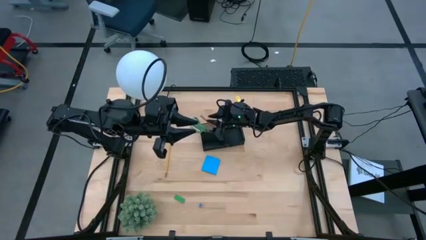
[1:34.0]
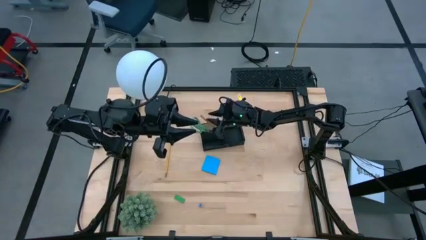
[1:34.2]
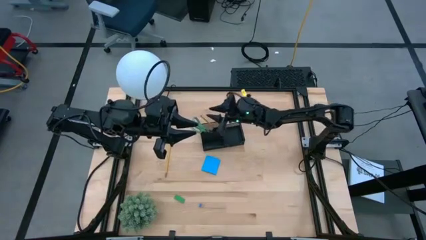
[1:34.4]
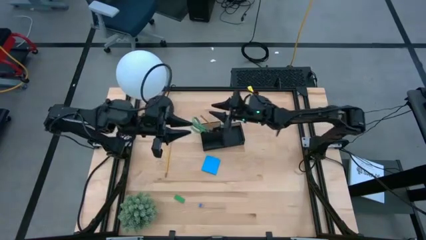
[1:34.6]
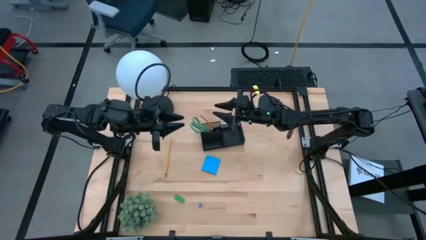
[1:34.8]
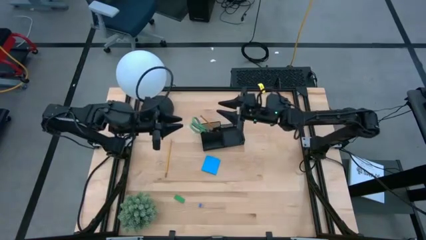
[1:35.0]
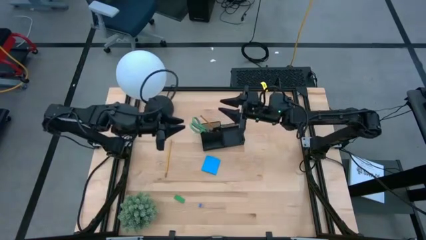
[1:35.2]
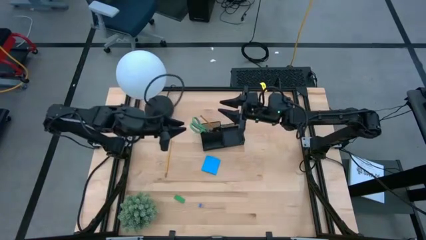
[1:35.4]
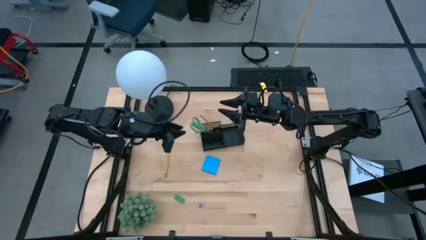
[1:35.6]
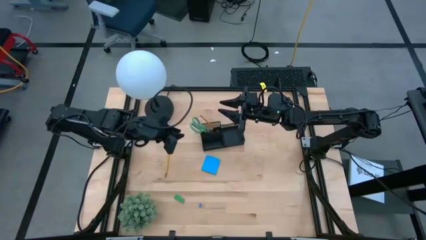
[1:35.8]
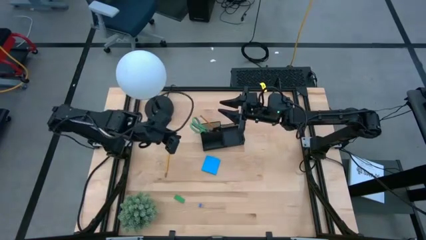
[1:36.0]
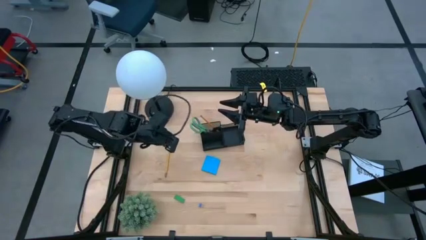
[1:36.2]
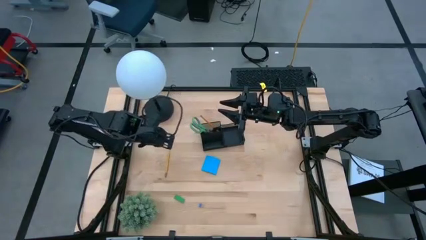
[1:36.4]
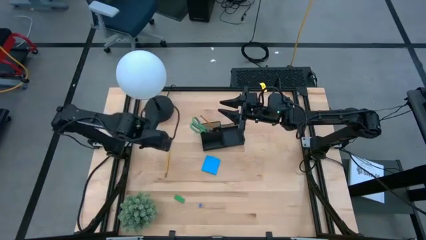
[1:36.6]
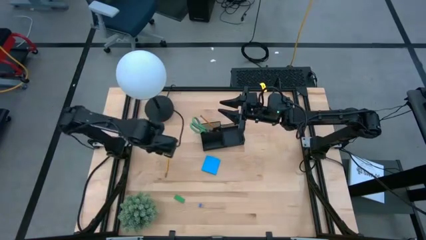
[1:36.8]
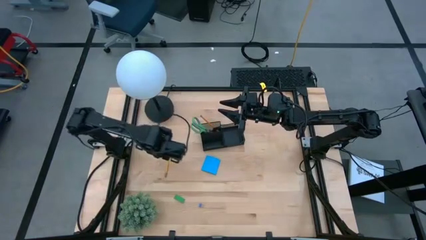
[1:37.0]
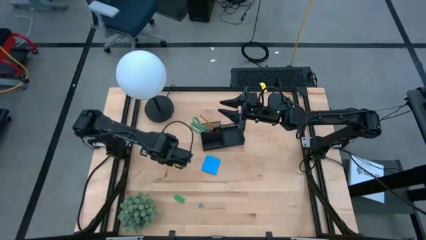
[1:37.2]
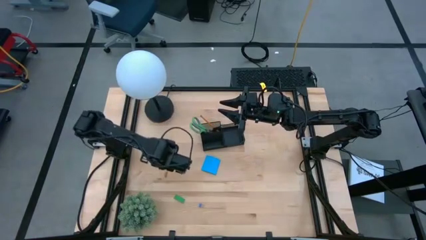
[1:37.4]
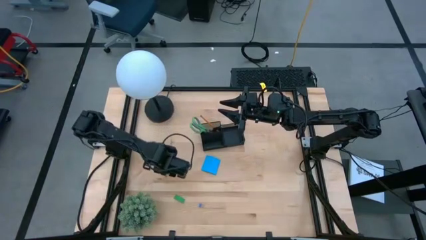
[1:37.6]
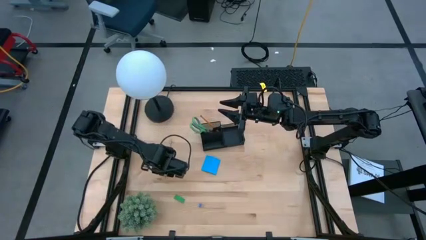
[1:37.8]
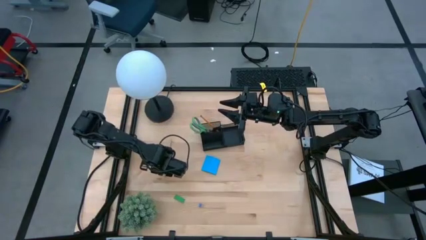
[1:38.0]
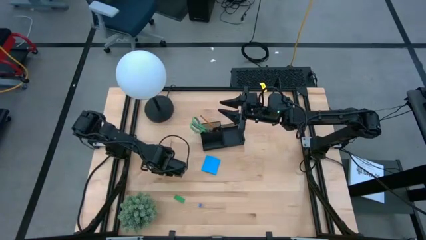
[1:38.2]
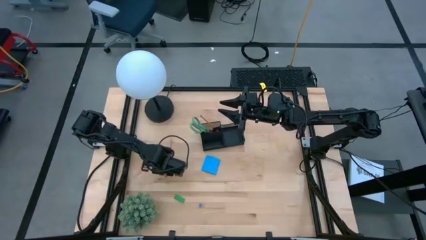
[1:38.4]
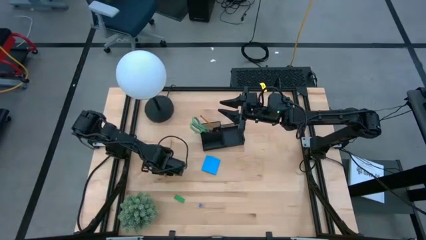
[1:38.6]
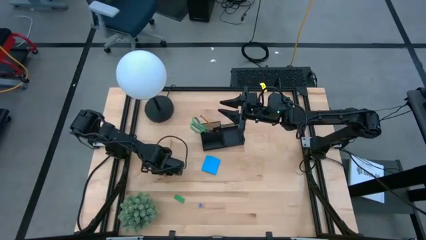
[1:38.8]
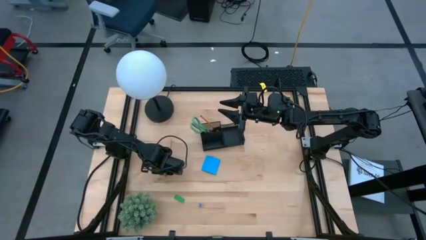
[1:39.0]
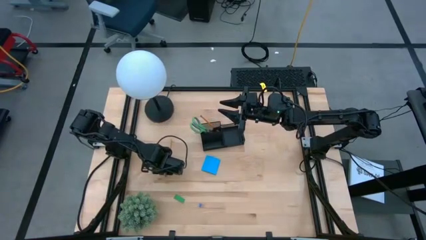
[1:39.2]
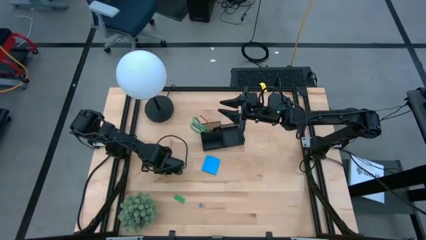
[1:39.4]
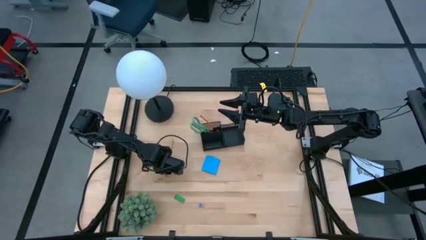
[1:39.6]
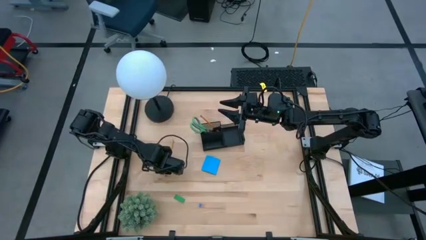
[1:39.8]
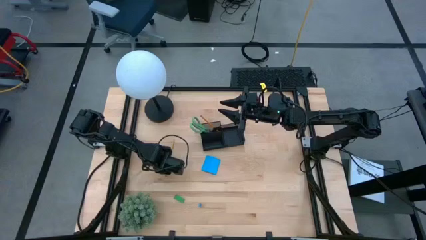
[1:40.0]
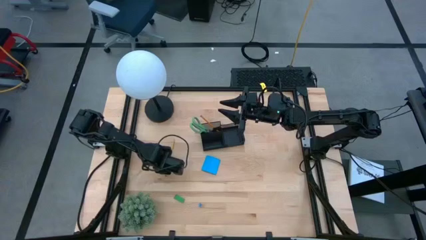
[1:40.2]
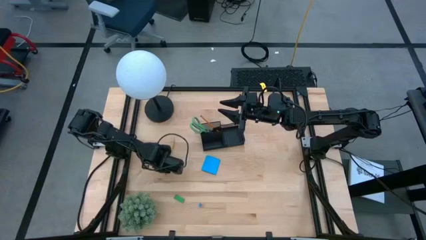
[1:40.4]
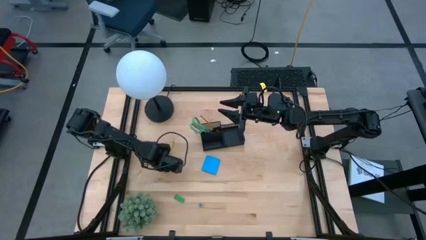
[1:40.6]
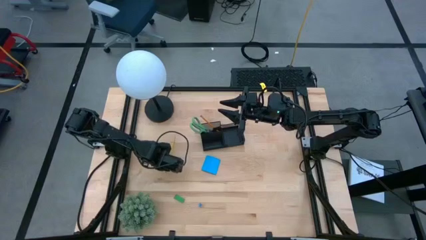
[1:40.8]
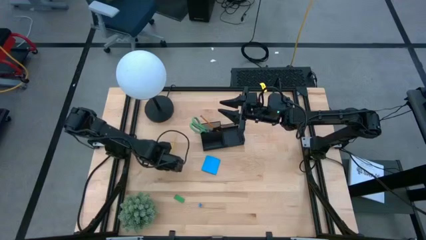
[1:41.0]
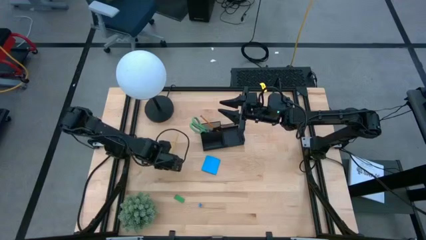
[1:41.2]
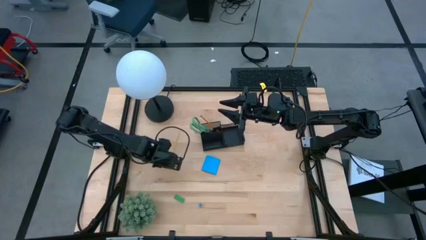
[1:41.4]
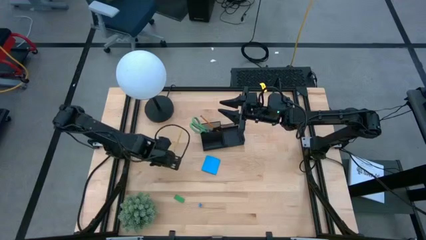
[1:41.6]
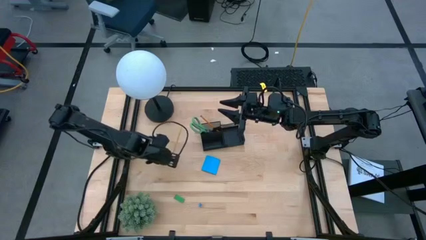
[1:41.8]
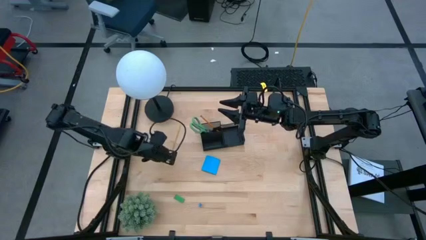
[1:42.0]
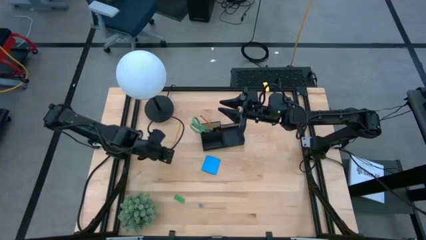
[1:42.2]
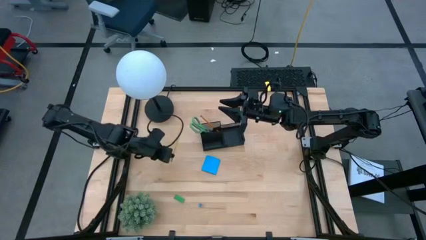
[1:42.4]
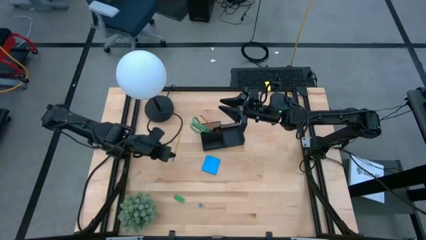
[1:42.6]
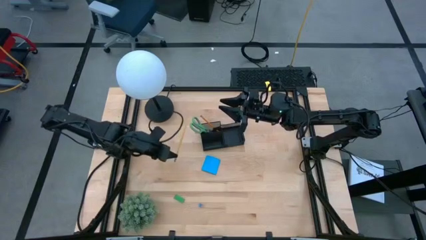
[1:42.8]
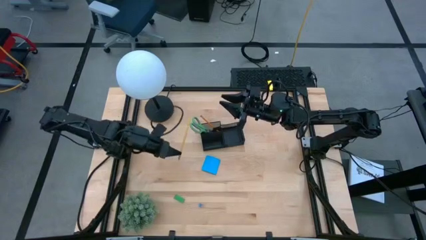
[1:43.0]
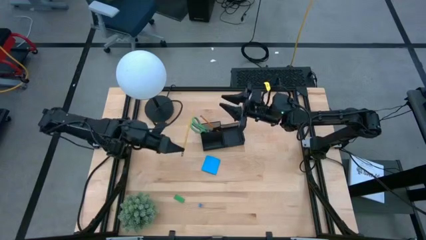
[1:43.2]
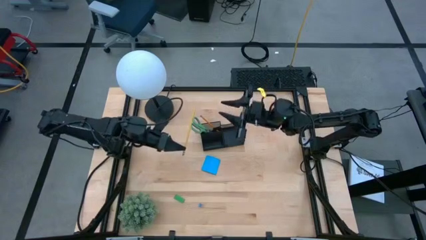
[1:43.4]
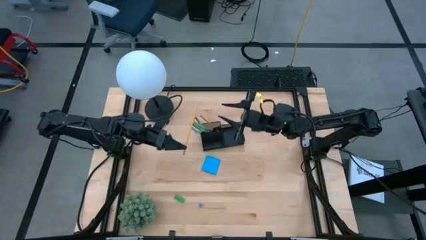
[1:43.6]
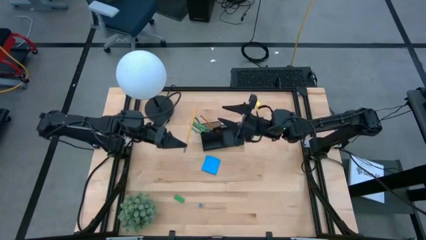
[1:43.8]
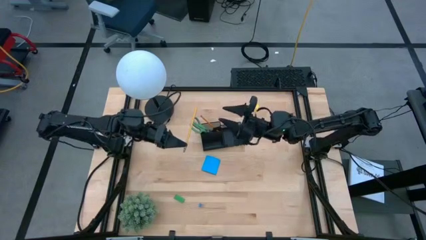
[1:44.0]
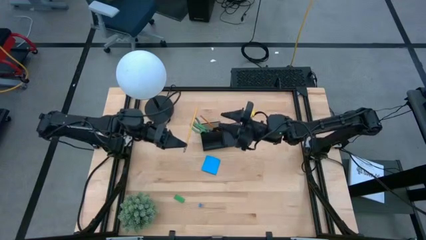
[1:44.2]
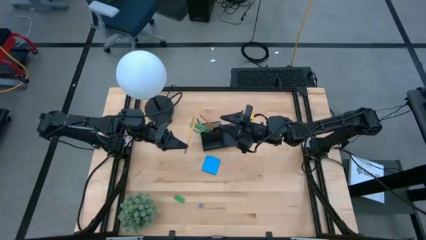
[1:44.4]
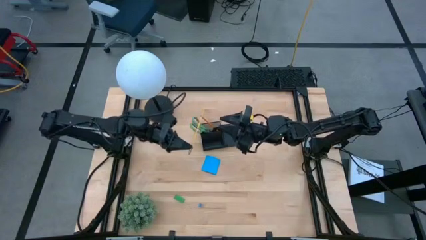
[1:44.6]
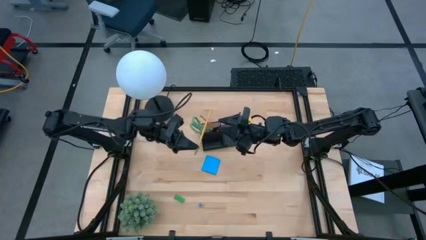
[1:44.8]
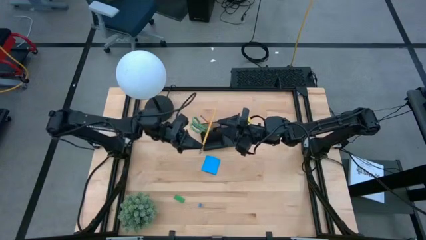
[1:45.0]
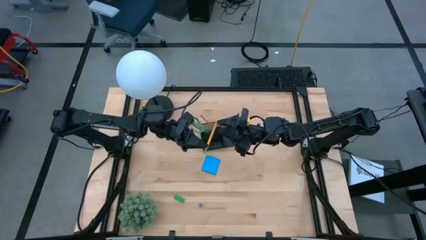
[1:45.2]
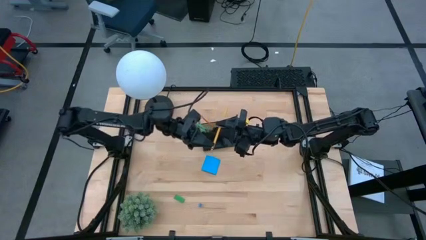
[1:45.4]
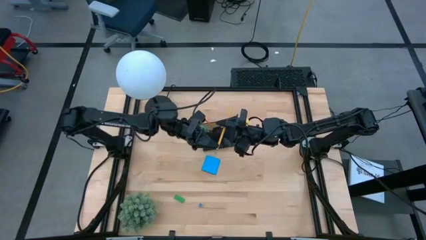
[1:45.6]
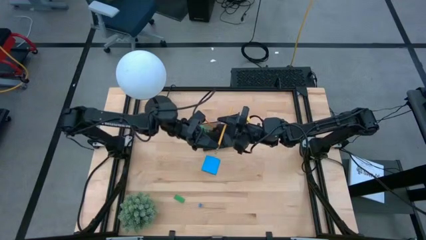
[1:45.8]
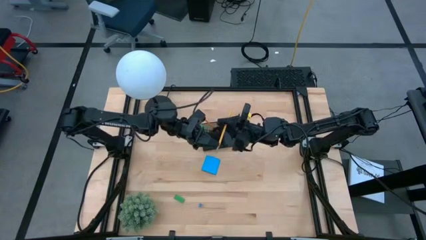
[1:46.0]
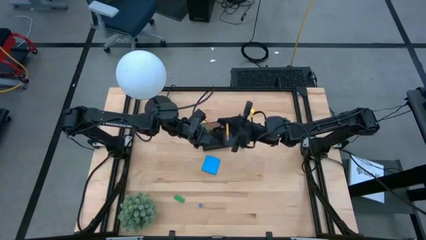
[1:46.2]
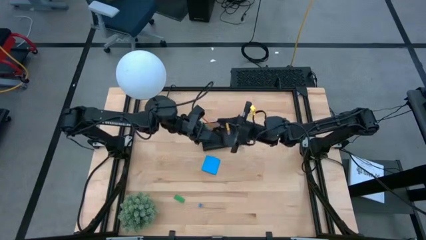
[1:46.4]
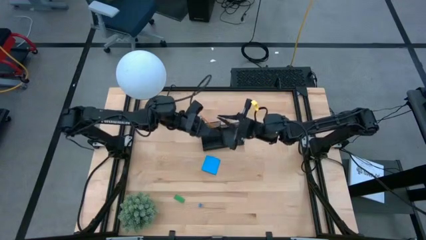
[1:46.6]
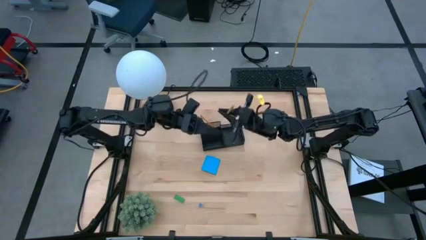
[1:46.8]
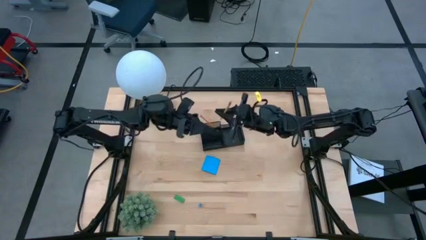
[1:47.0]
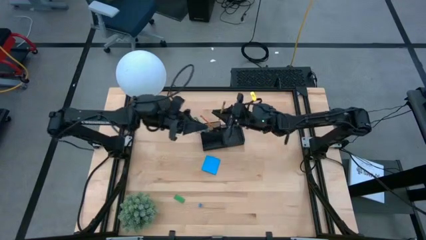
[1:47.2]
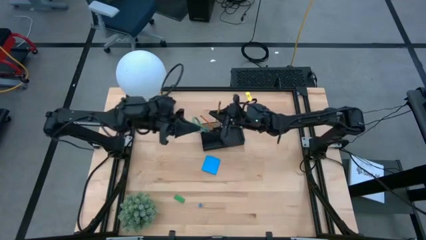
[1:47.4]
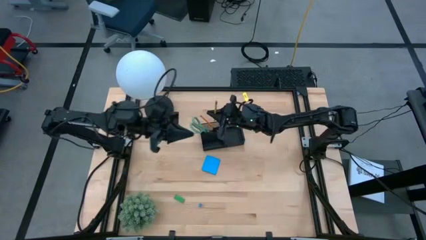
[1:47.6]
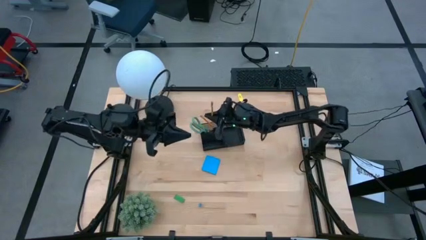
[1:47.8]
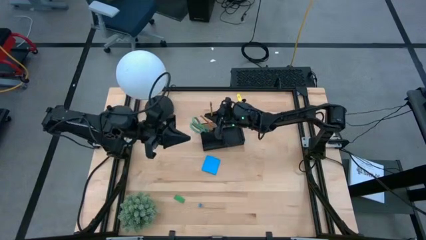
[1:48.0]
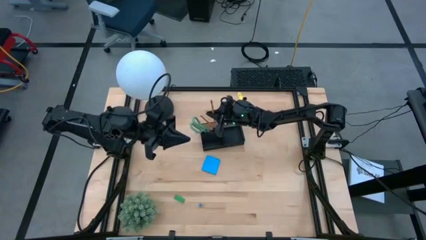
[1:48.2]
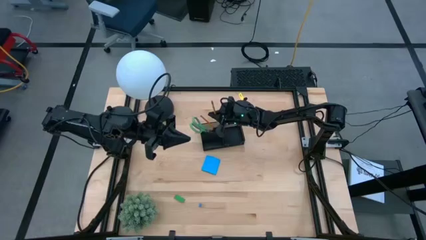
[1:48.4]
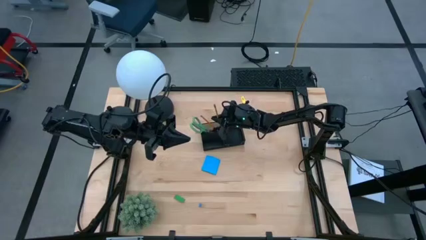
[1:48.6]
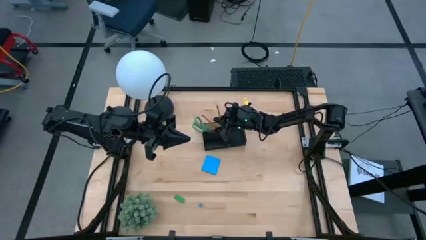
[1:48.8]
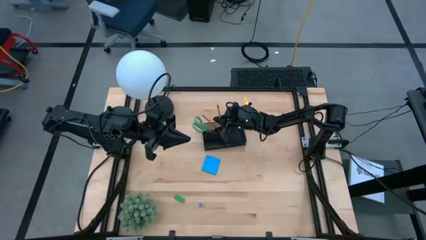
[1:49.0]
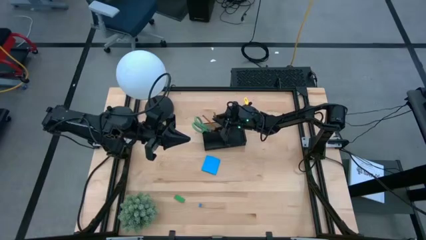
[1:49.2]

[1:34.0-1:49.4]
Task: Pick and place office supplies into organizer
Put the yellow pencil into the black desk organizer

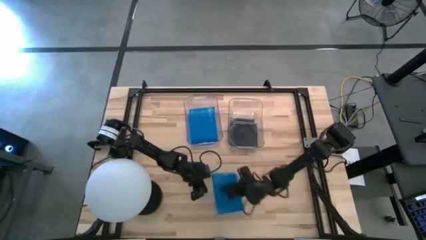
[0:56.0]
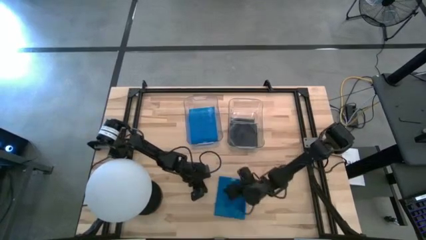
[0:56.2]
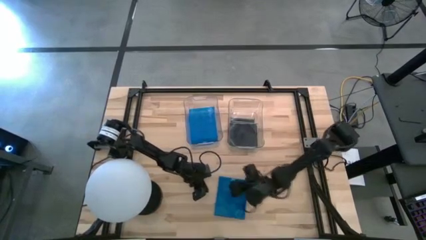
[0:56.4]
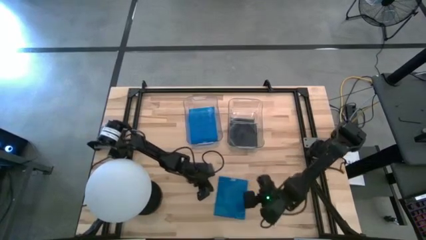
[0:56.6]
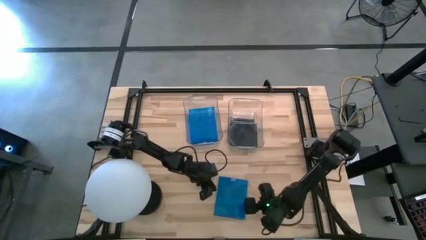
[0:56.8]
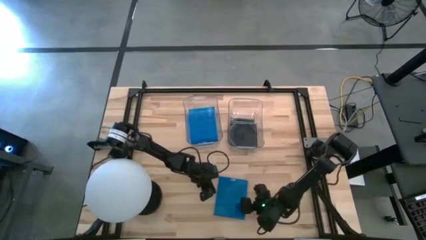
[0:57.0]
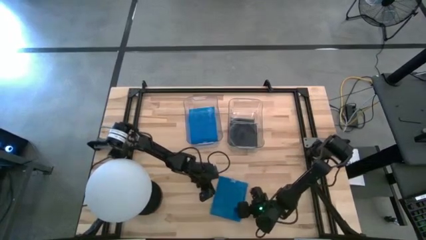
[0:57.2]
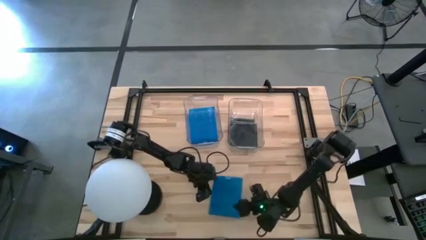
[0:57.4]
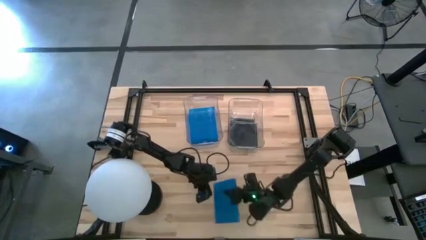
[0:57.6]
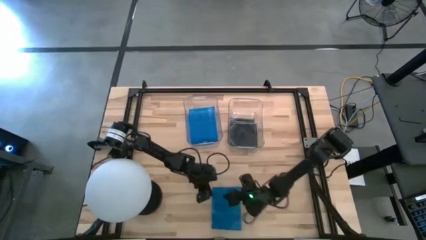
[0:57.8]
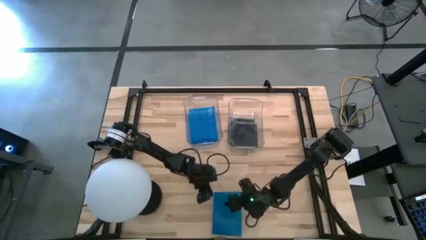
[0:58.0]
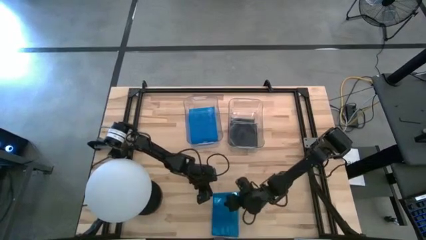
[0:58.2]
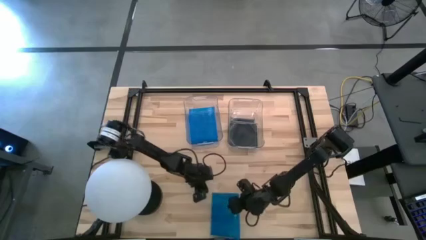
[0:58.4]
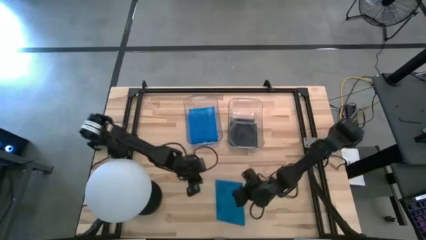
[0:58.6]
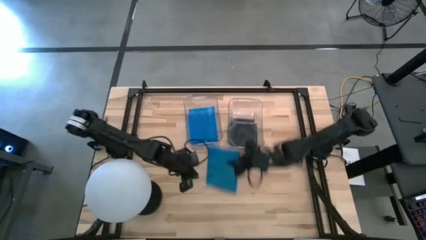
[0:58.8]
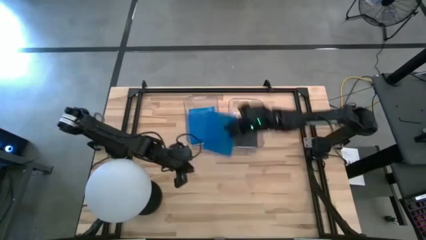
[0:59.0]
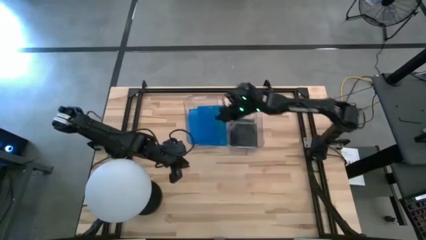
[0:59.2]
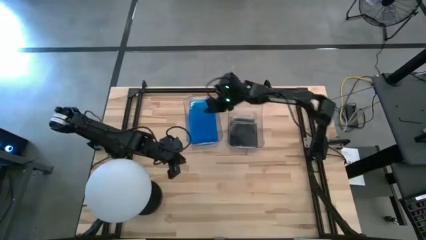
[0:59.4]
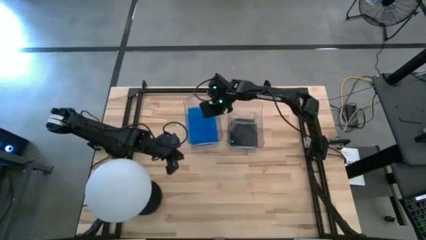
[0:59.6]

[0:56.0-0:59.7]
Task: Pick & place jewel cases by type
Put the blue CD case into the left transparent bin
